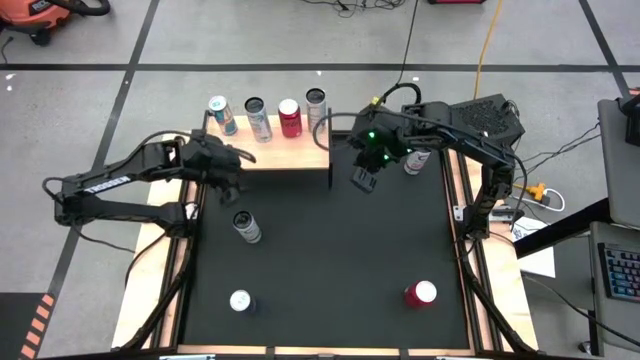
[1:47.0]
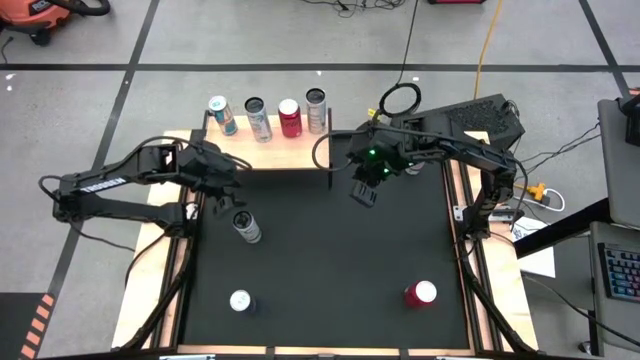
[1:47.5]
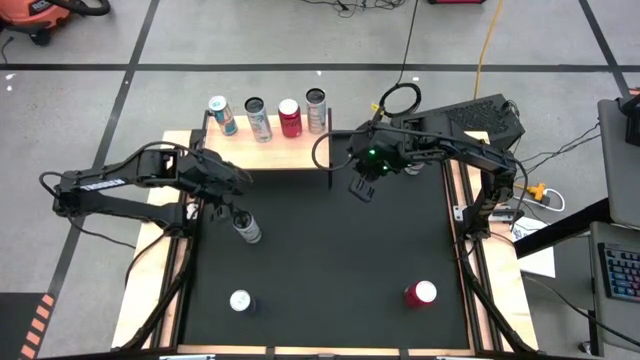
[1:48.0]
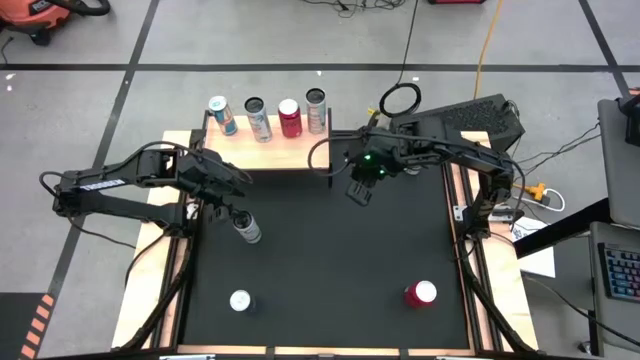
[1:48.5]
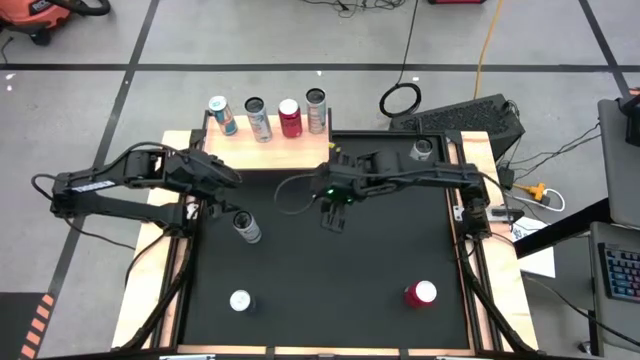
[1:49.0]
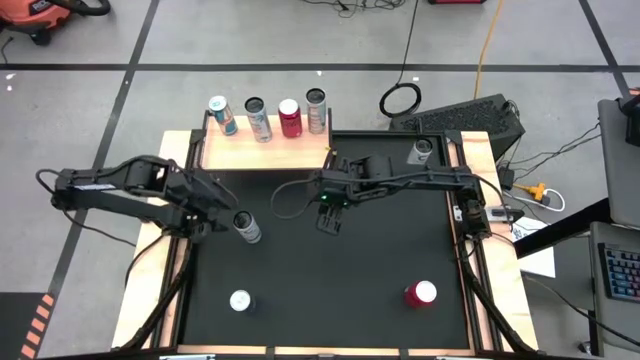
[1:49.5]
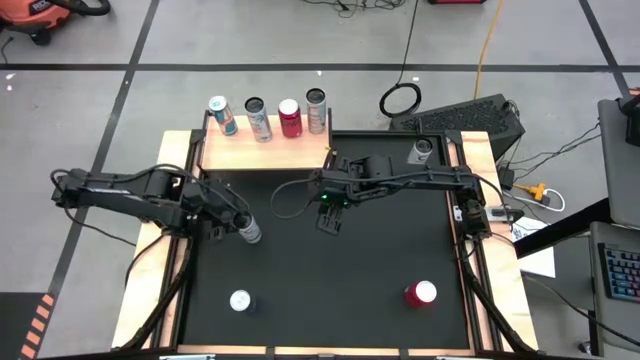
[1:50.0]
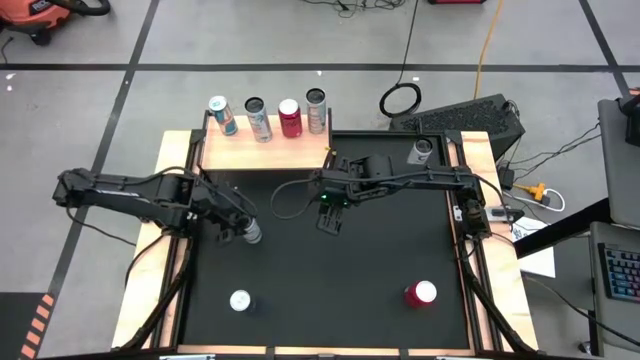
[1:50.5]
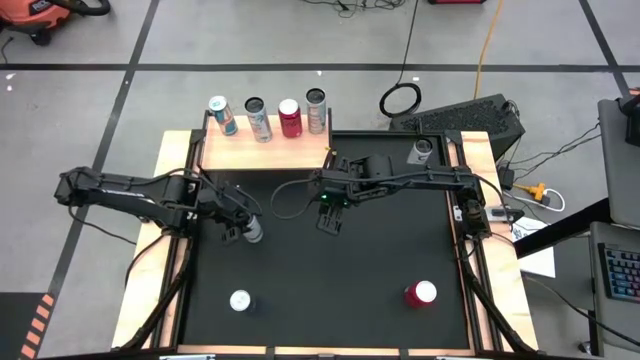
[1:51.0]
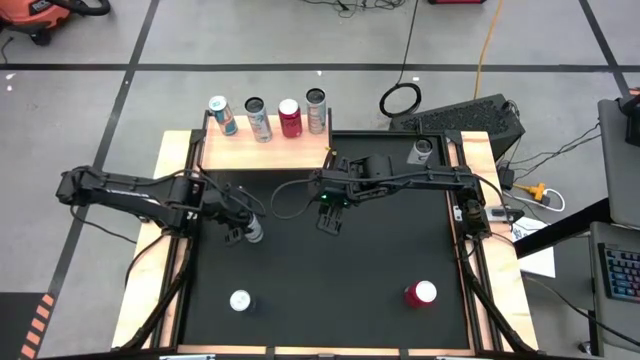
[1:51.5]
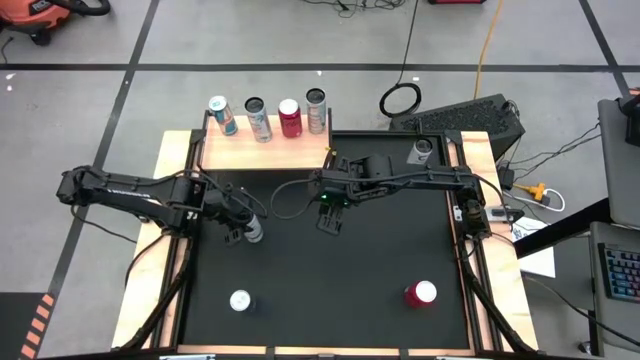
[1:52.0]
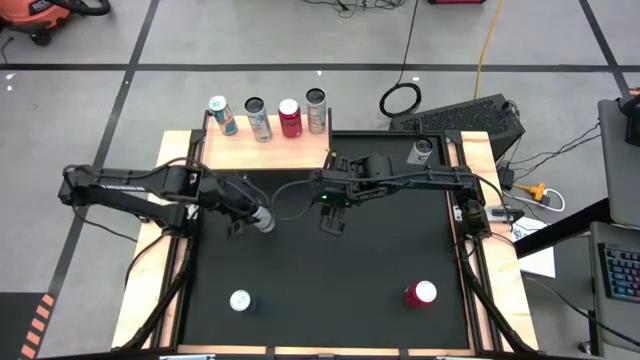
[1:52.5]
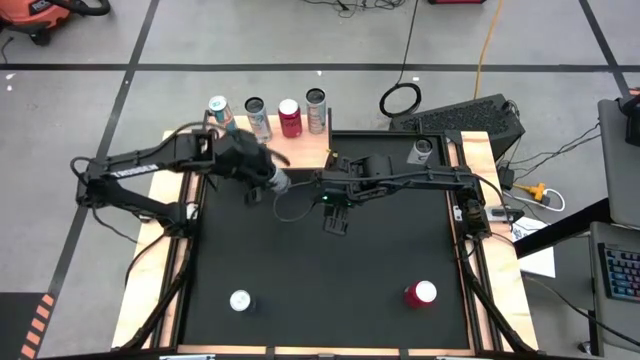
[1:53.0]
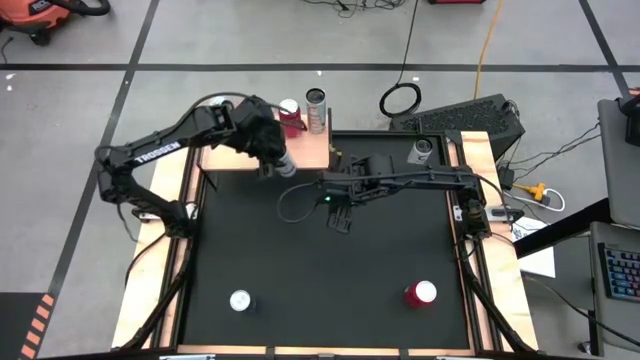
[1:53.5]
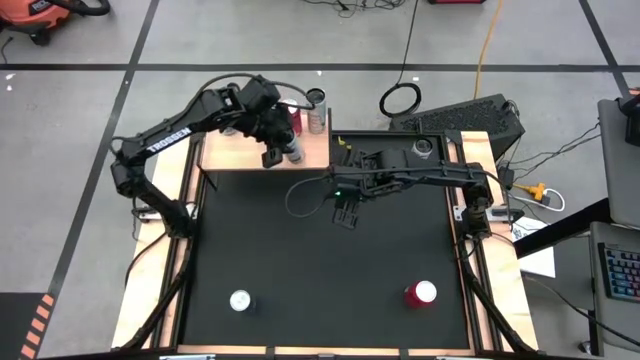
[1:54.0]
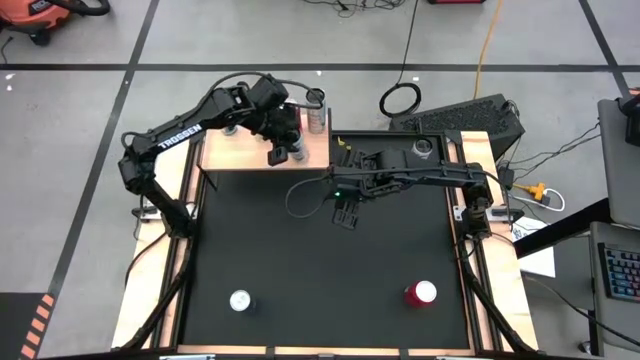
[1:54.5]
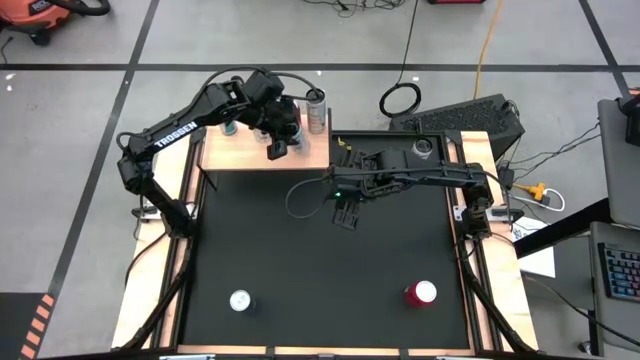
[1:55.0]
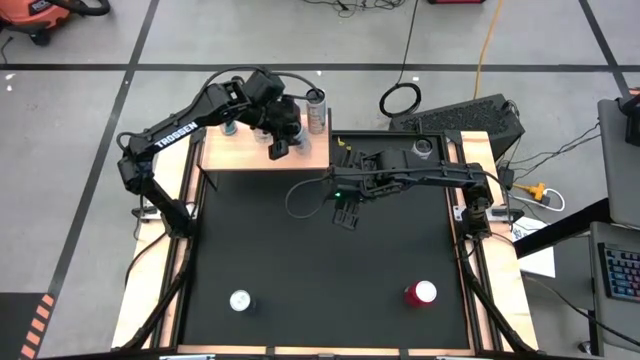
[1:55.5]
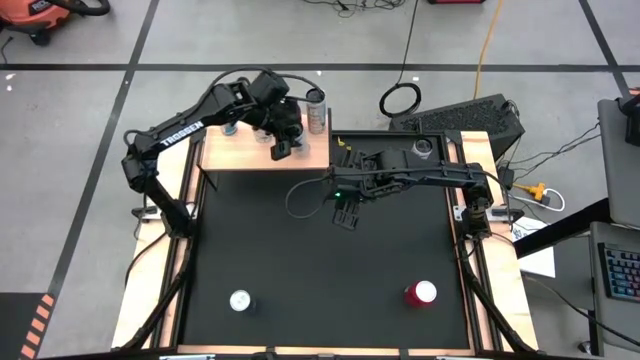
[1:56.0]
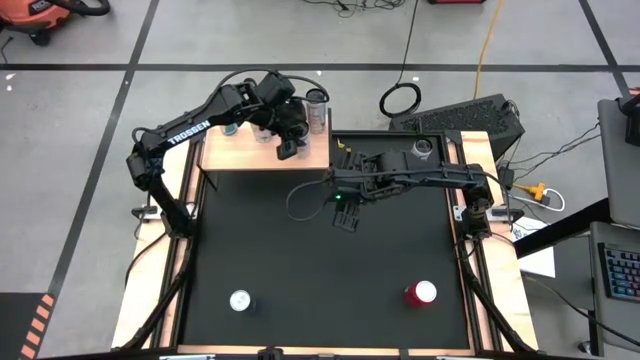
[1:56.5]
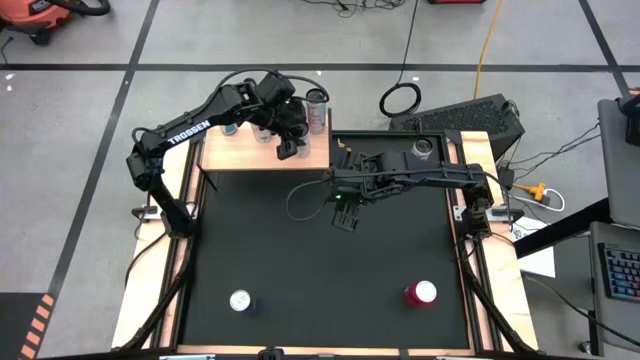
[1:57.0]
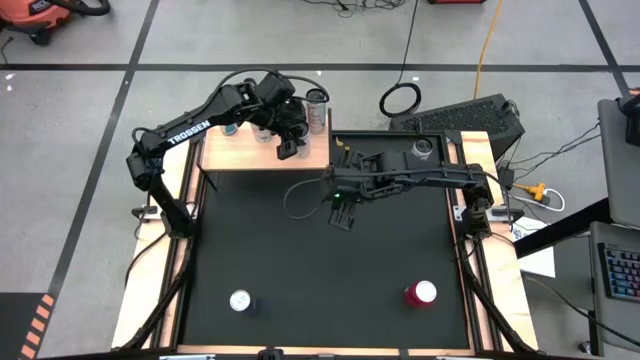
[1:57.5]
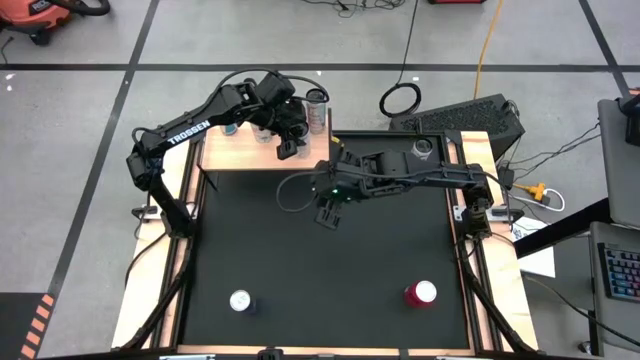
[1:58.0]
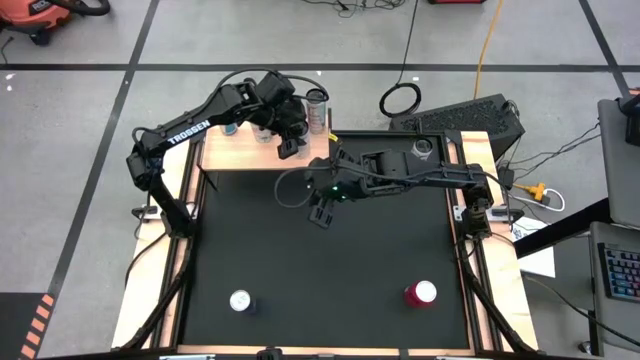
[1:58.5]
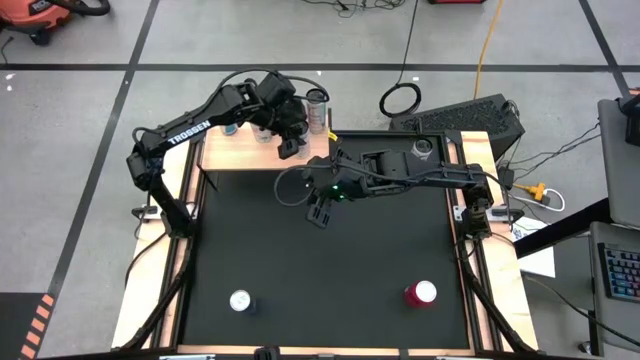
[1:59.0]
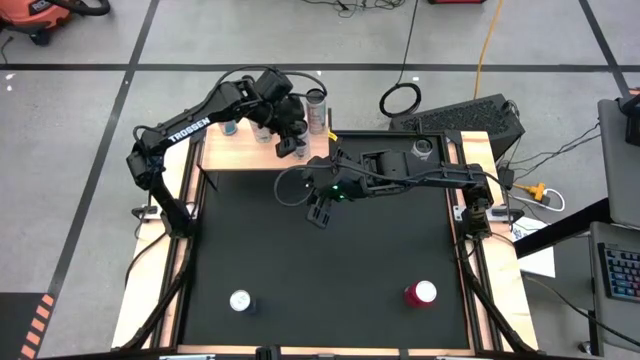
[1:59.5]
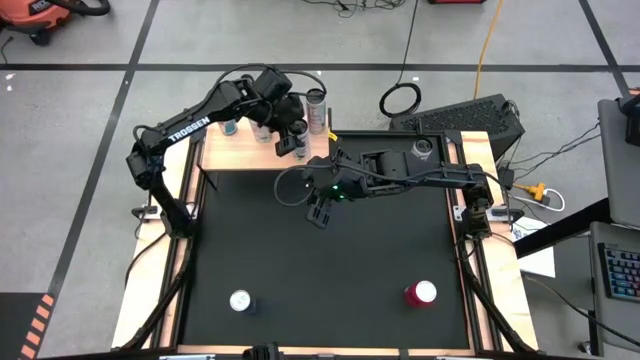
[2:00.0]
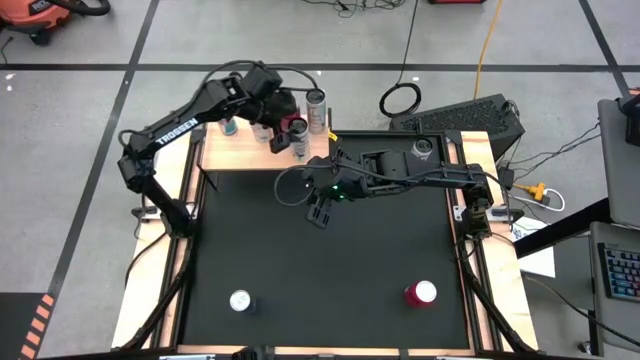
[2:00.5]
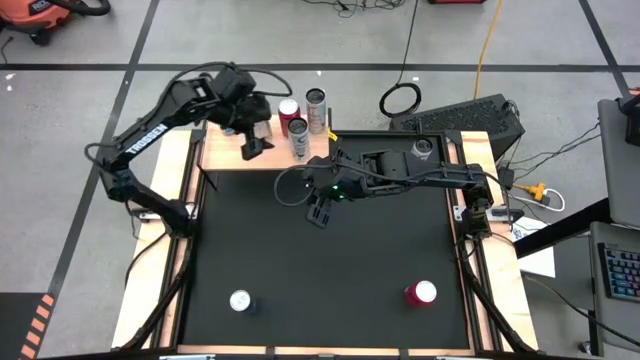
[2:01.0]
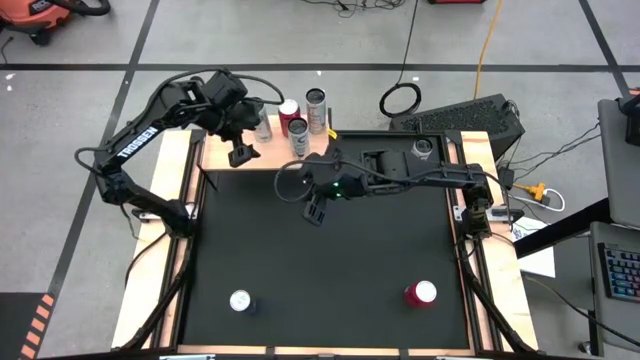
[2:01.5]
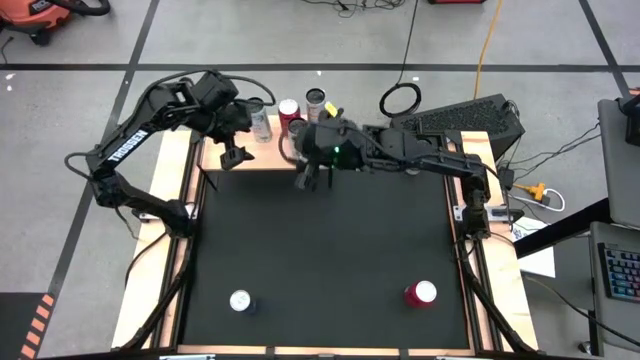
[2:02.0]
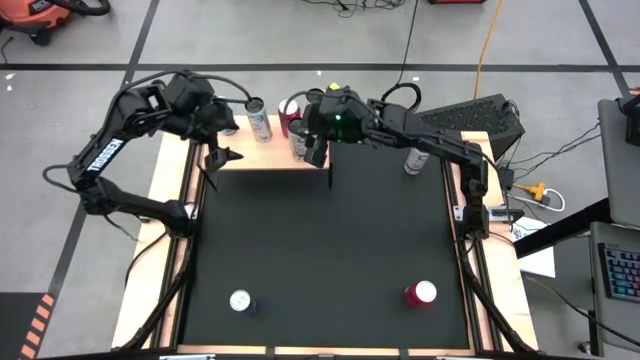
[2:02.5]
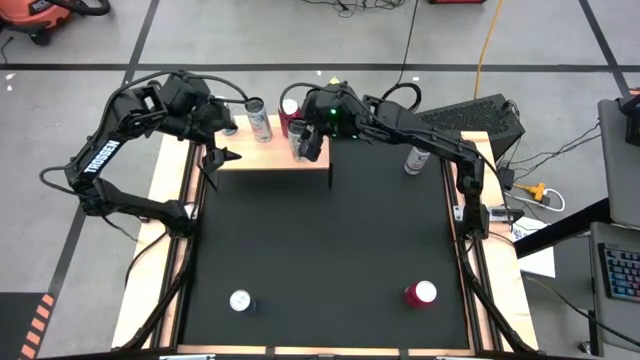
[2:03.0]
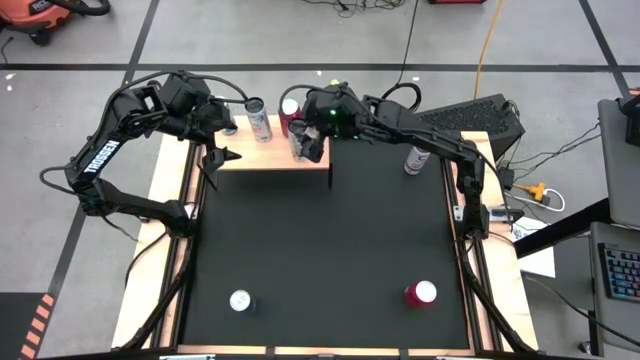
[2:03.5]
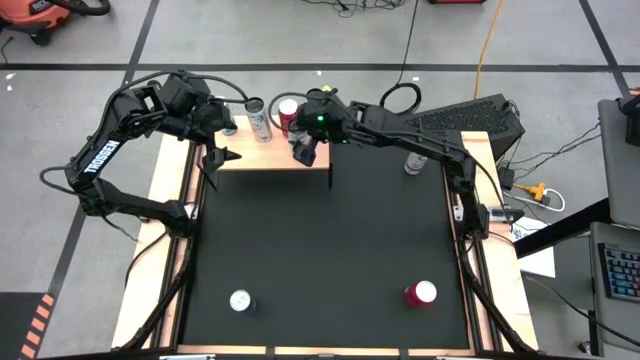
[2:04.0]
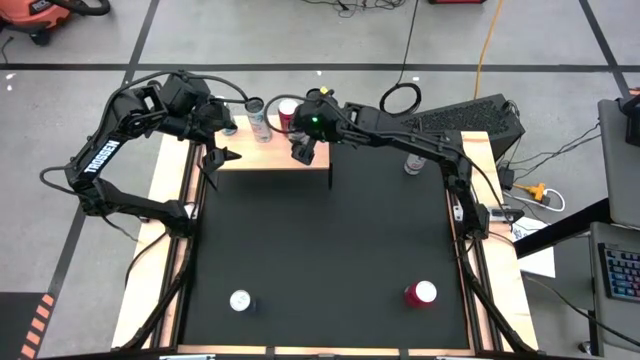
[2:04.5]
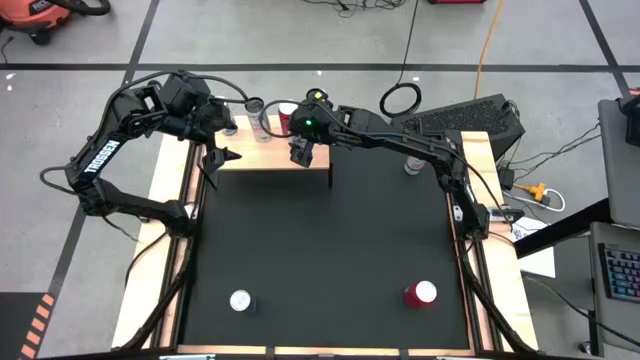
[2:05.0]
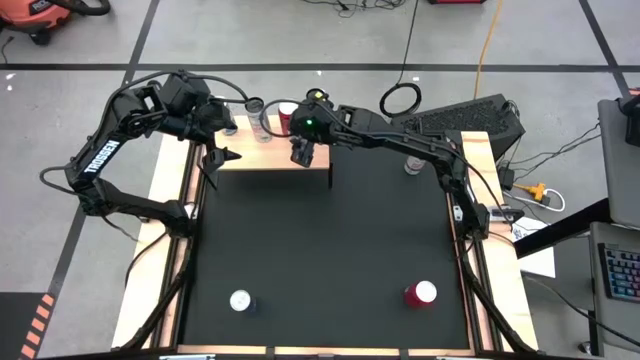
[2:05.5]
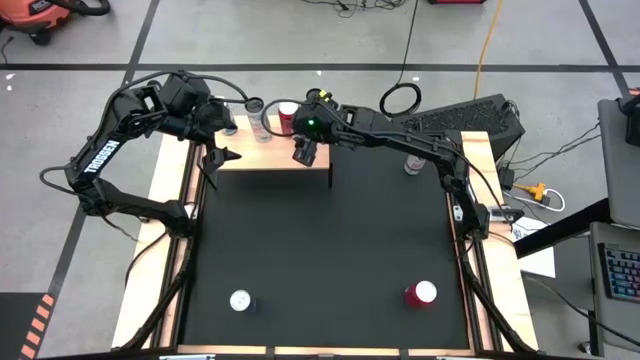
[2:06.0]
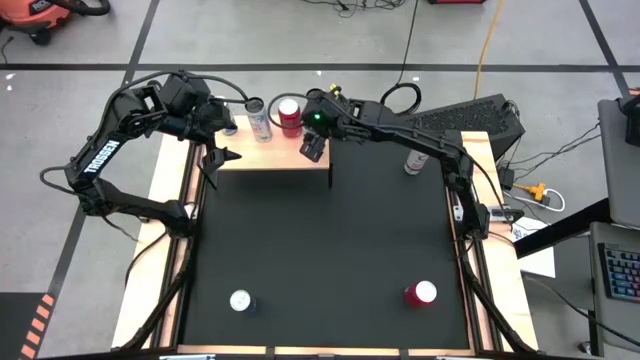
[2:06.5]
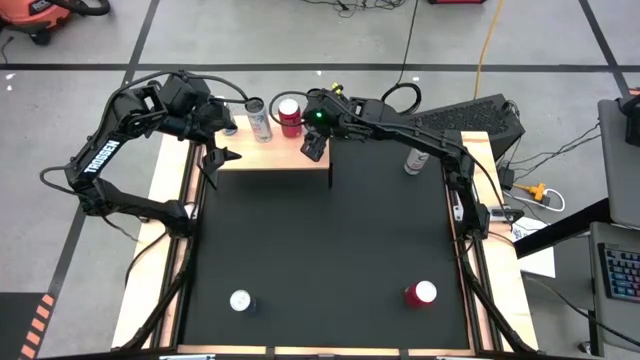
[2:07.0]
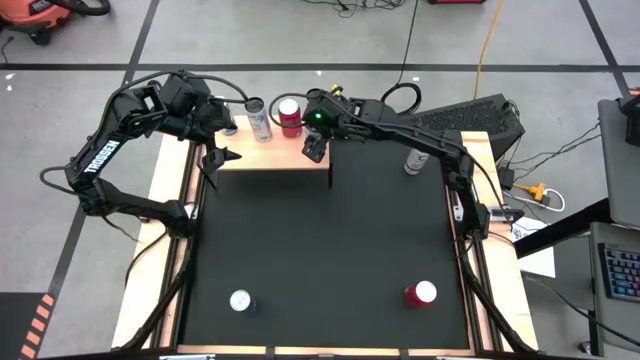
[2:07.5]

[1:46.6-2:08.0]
Task: Place canned beverage on shelf
Put the white yellow soda can on the shelf aligned with the other white yellow soda can
